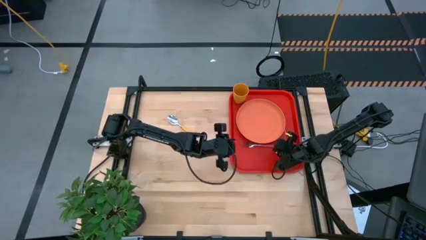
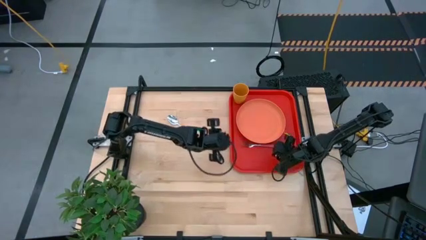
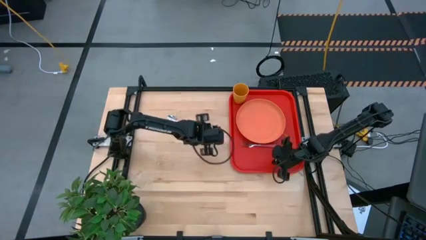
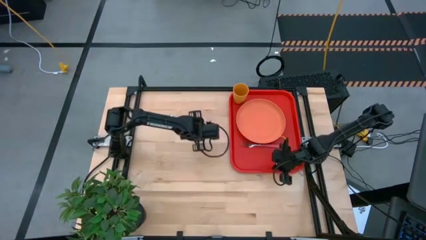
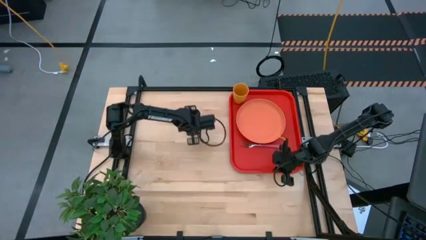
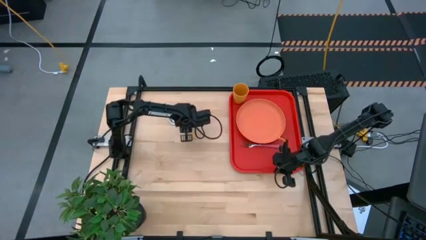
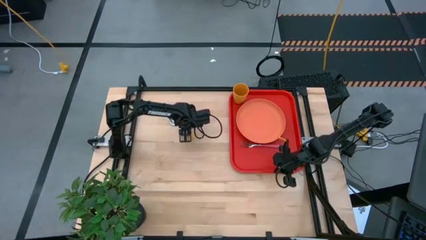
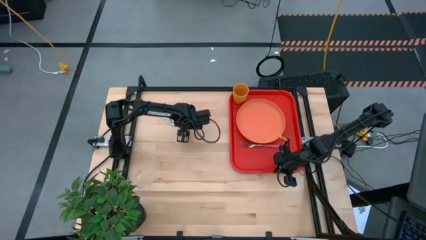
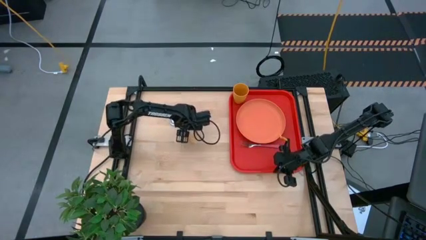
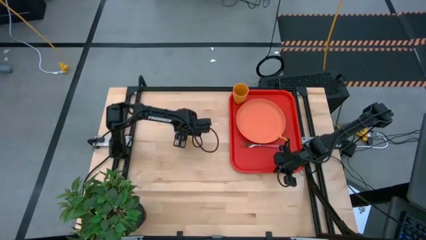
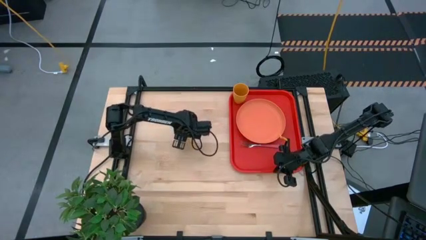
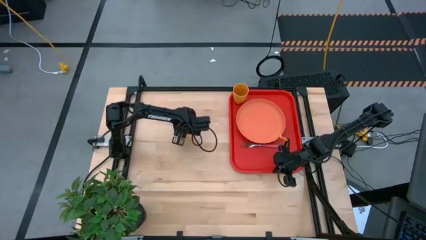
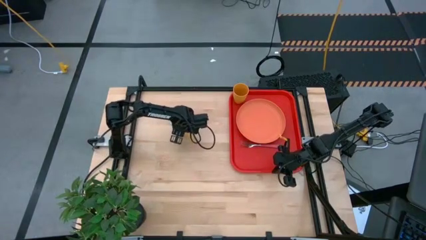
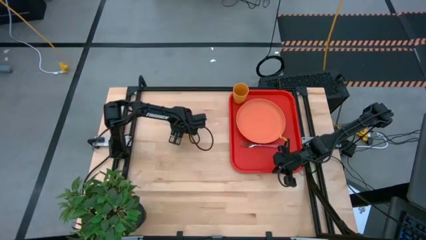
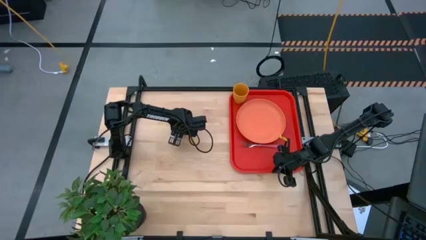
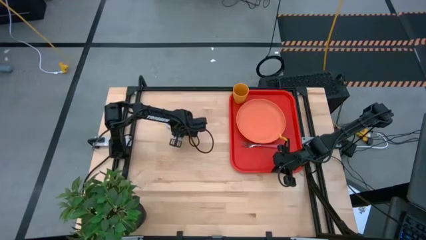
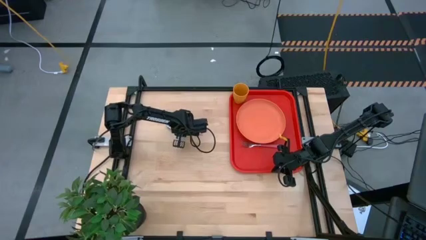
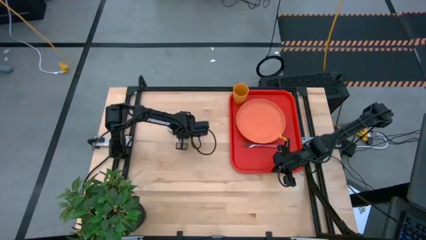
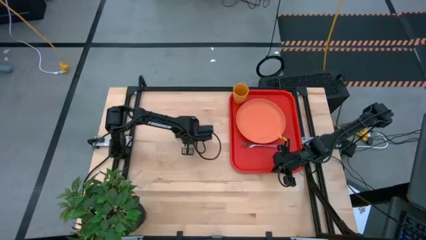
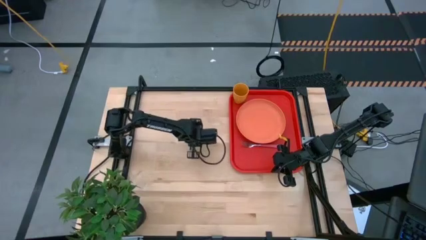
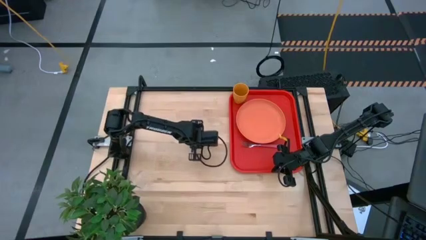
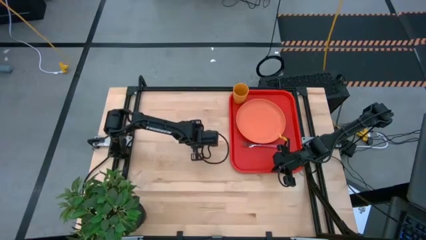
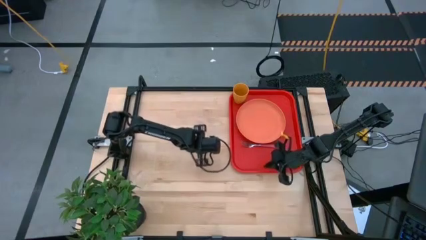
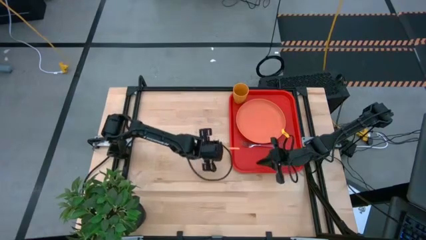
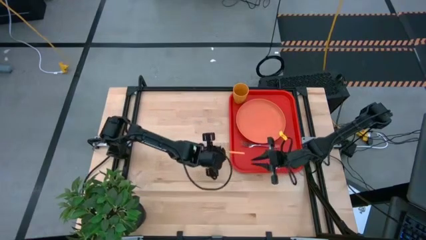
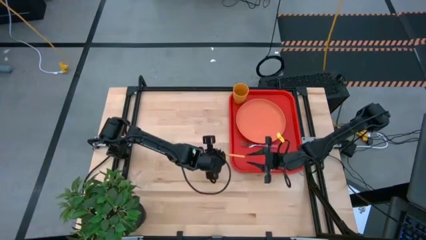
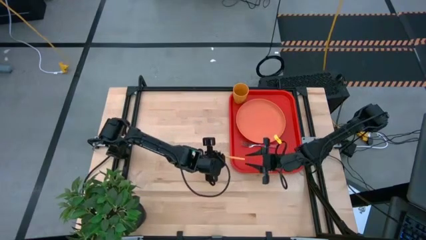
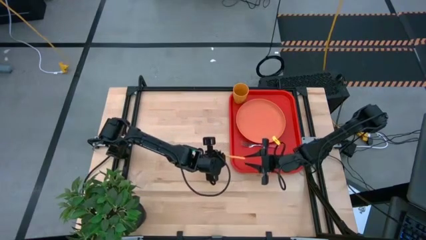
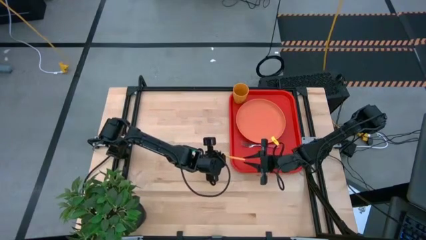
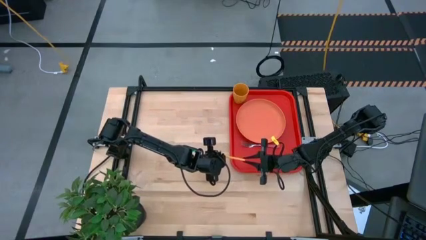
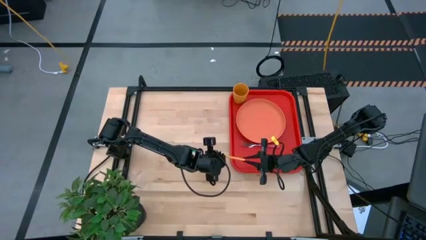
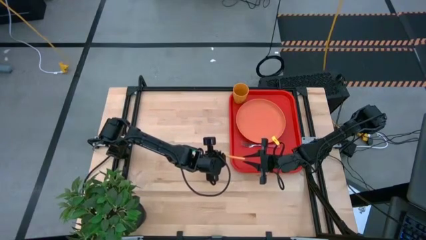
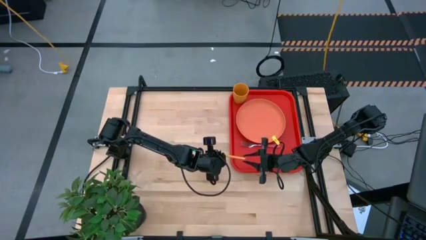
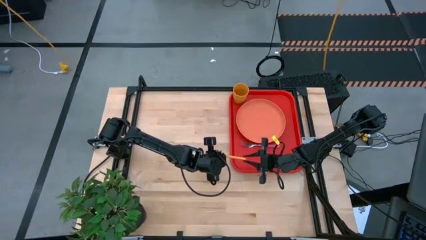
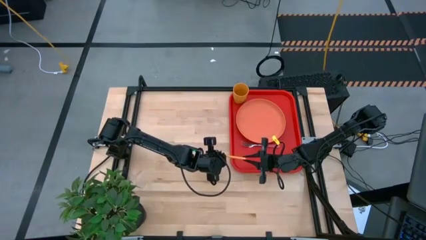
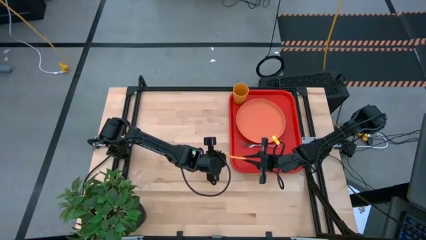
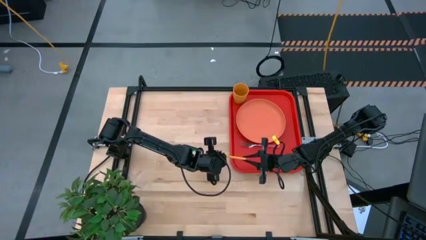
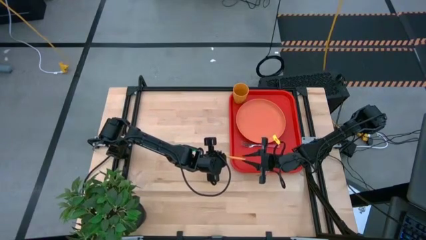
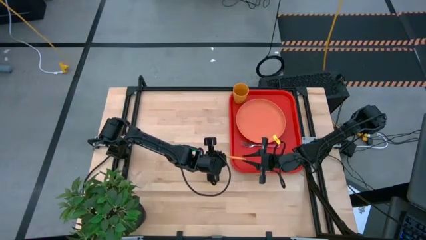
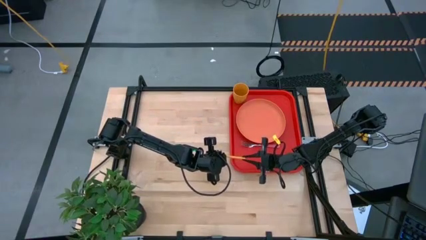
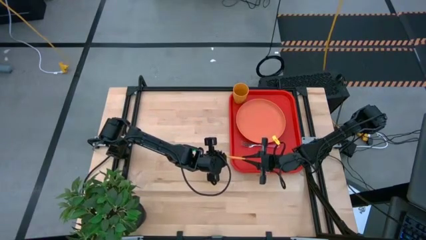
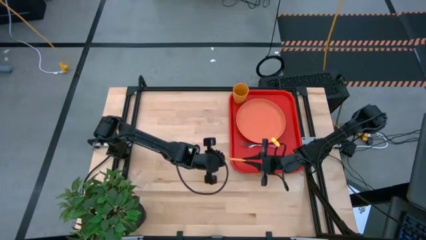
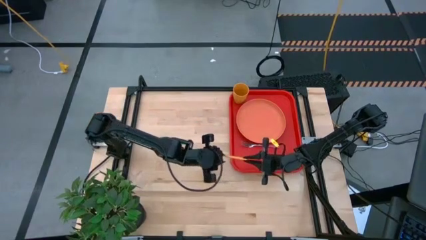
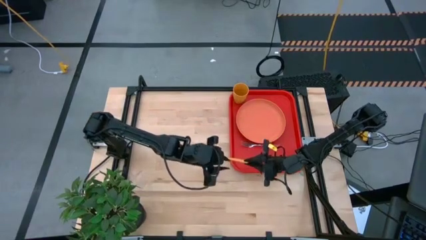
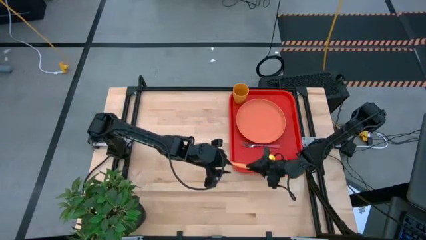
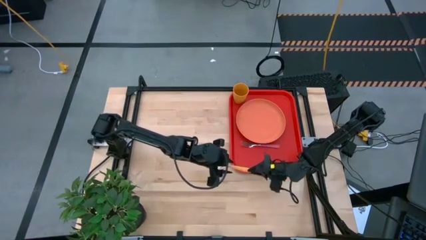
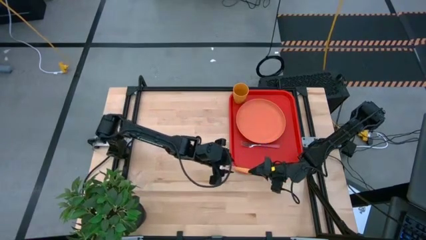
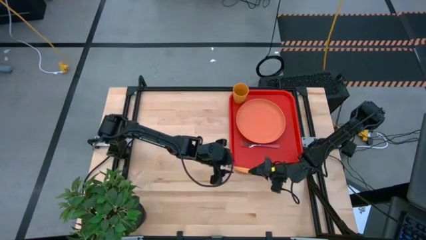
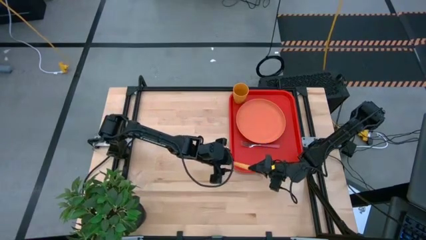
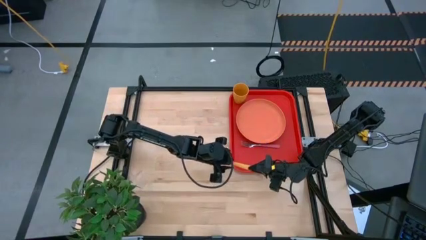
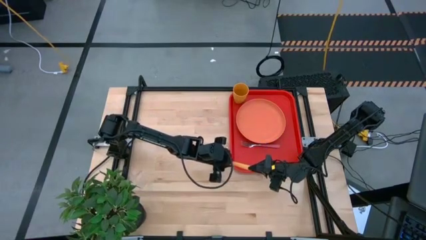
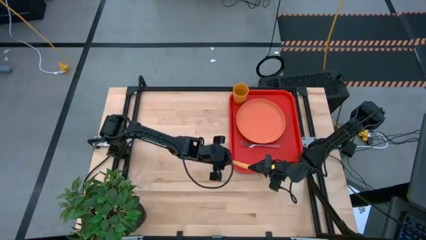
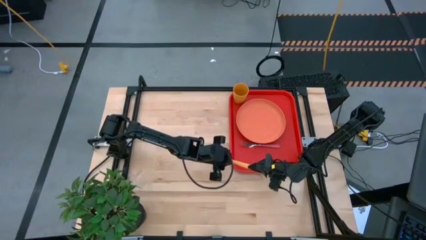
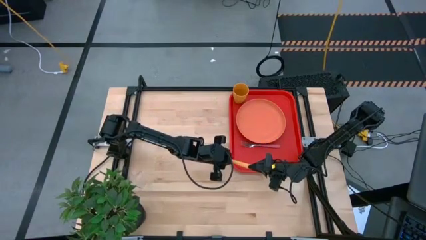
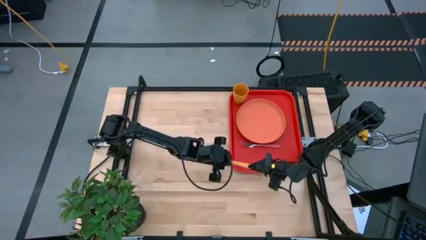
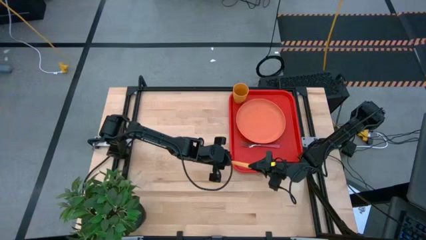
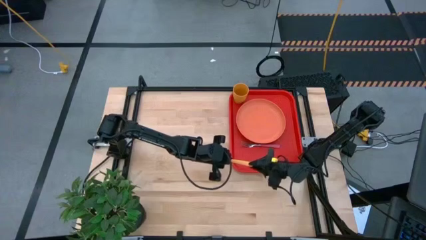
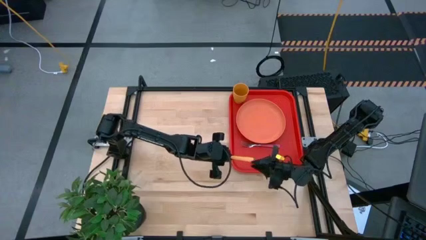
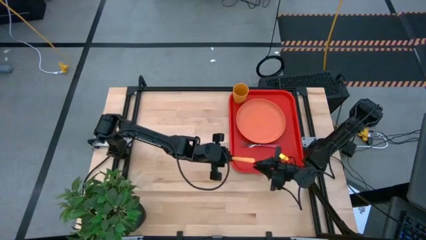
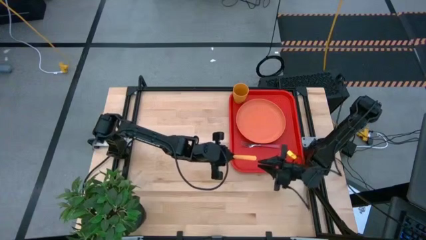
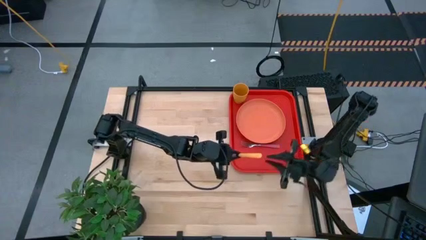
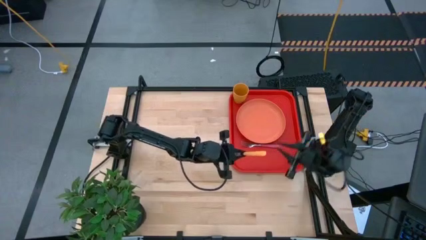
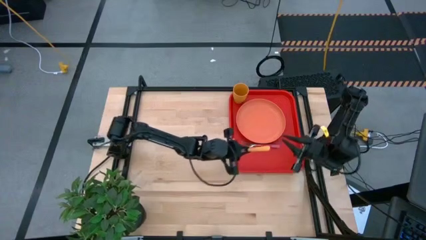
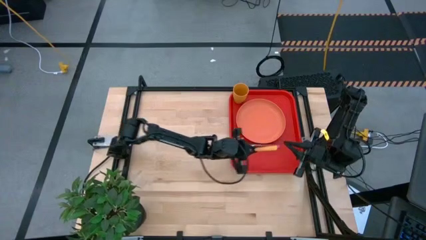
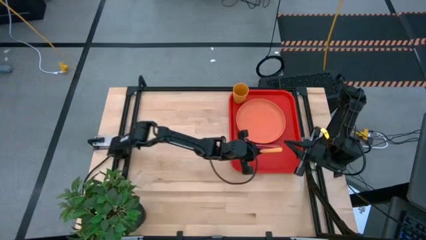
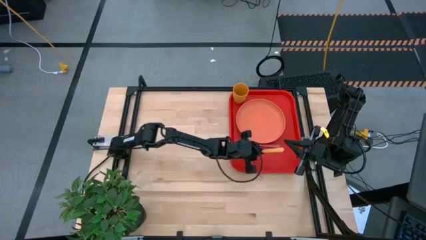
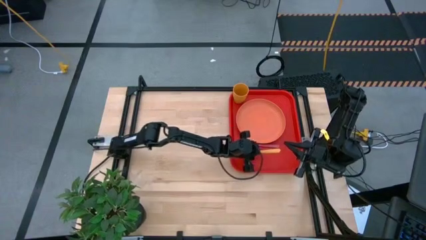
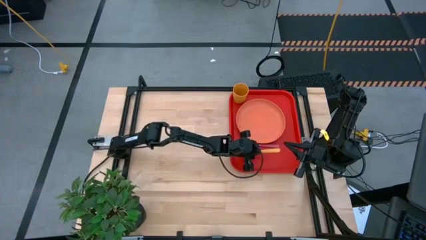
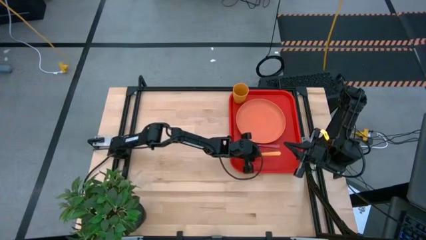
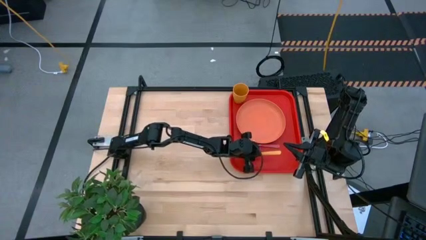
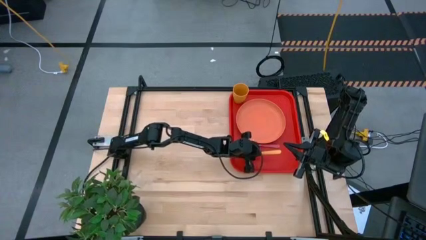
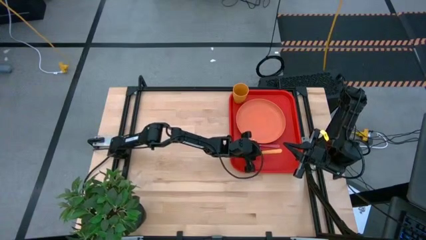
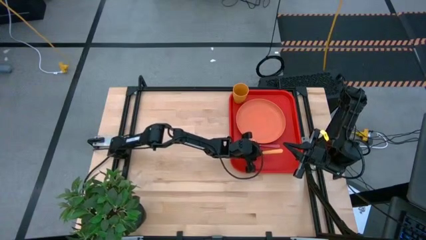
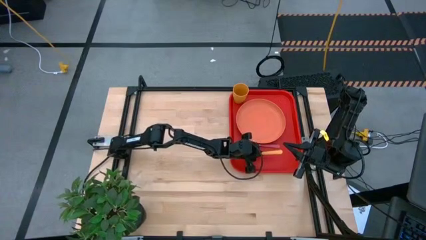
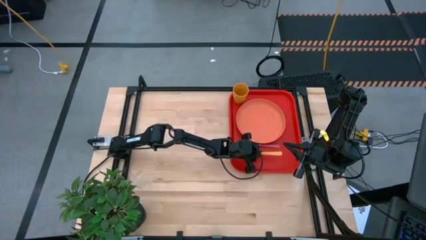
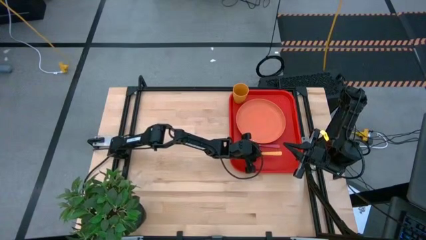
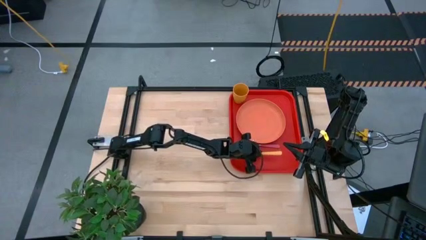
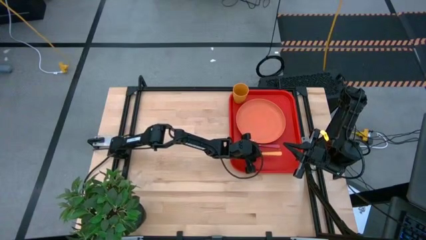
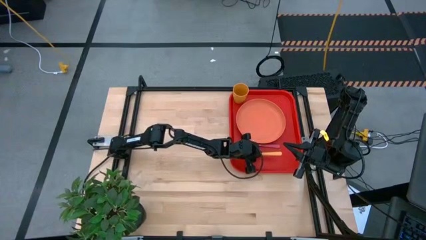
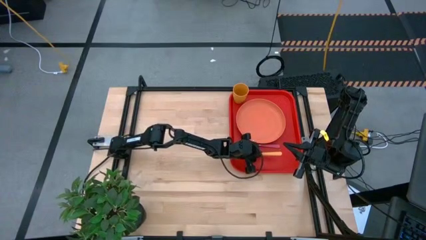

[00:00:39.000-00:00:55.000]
Task: Pick and place plate/cup/fork/spoon on tray
Put the yellow spoon on the red table tray to the bottom of the pink fork

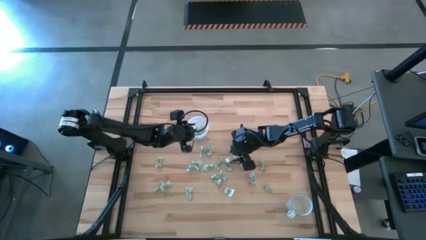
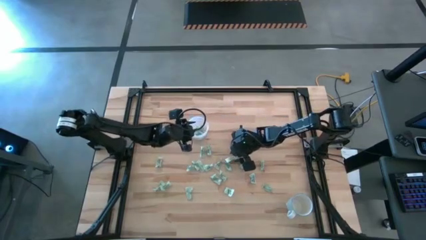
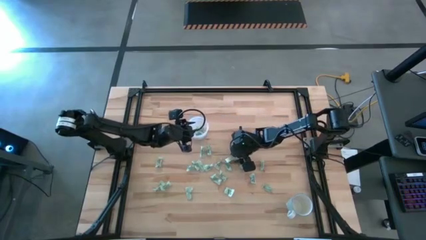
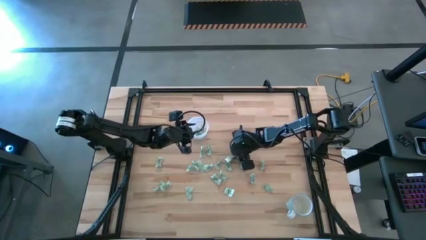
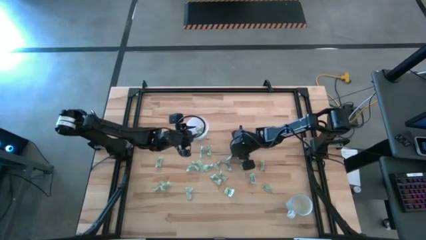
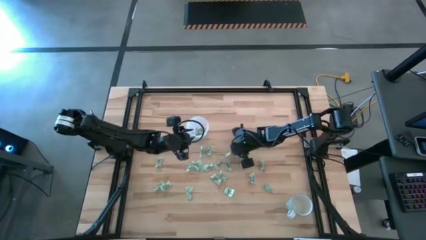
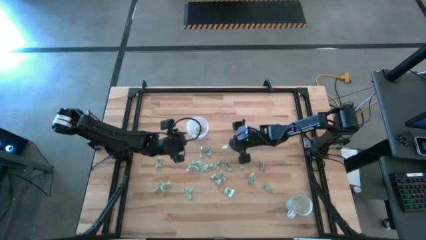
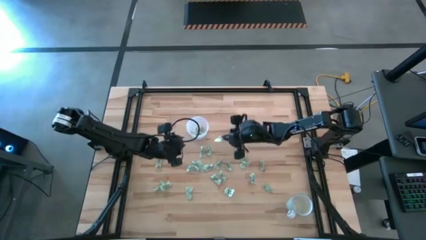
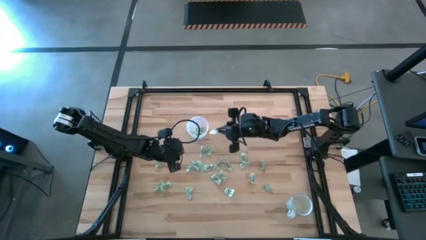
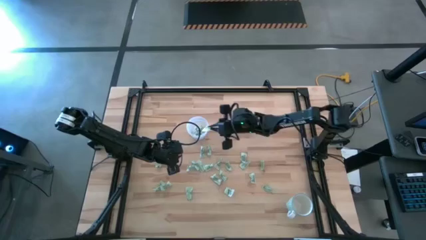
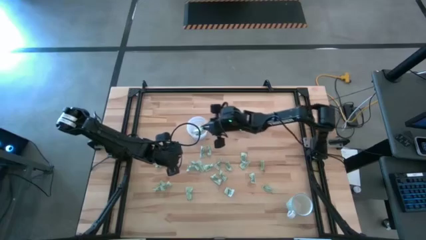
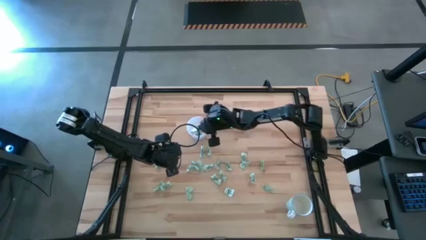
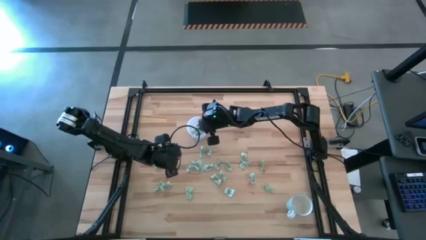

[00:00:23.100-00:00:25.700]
Task: Pick and place Stevia / Truvia into bins
Put the stevia packet into the transparent container
